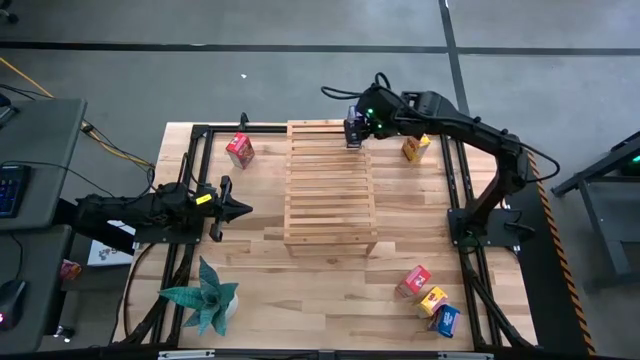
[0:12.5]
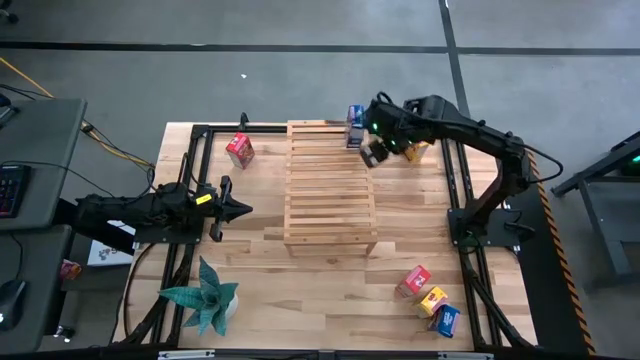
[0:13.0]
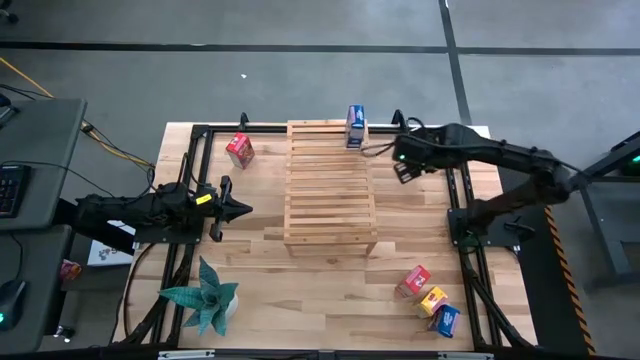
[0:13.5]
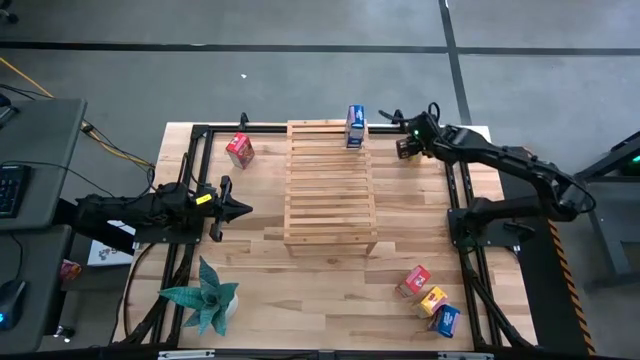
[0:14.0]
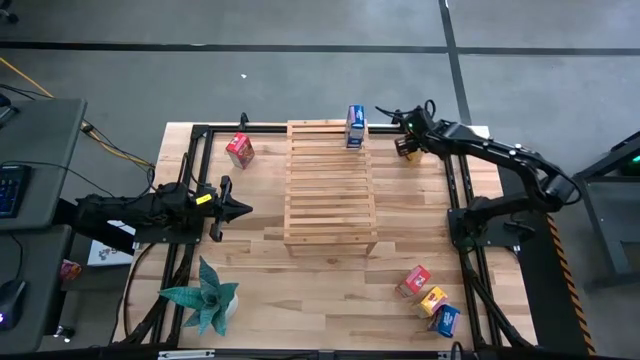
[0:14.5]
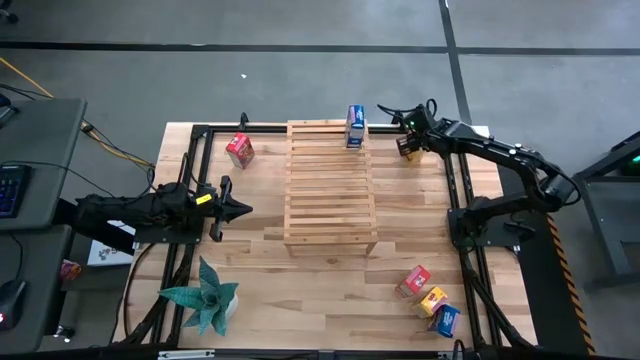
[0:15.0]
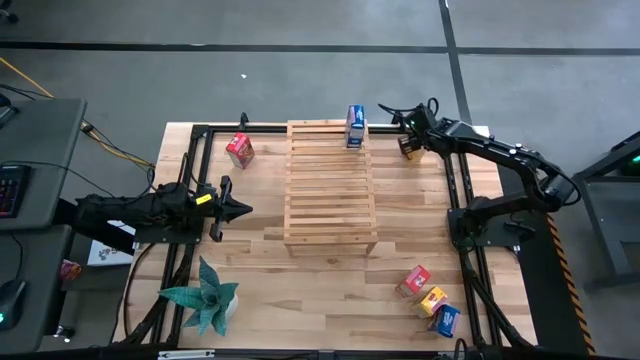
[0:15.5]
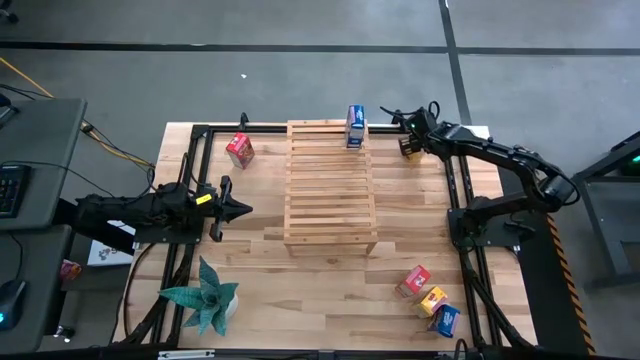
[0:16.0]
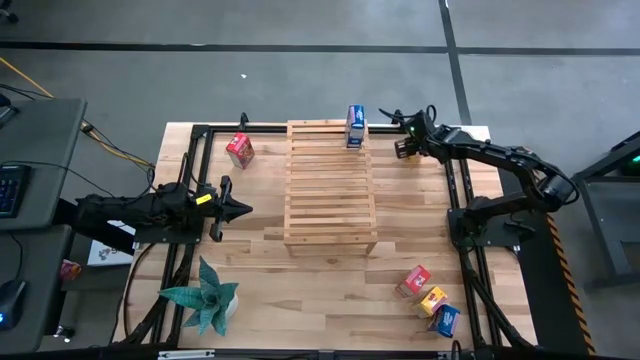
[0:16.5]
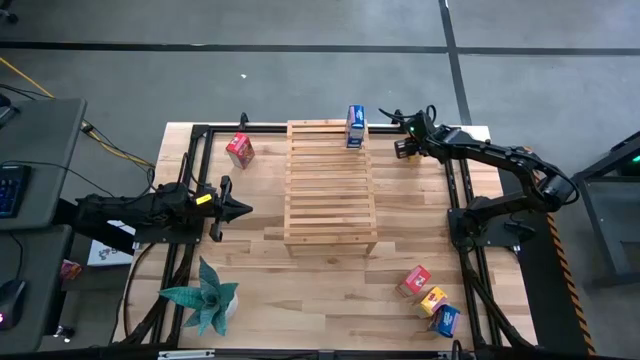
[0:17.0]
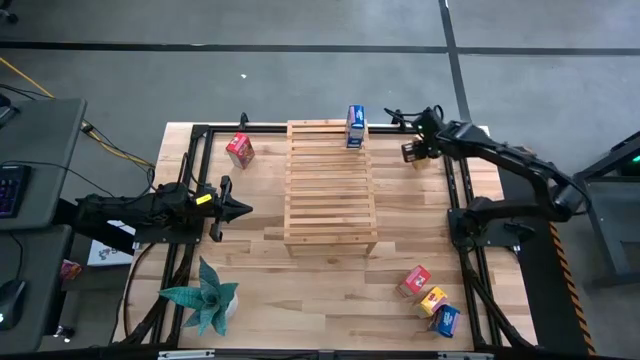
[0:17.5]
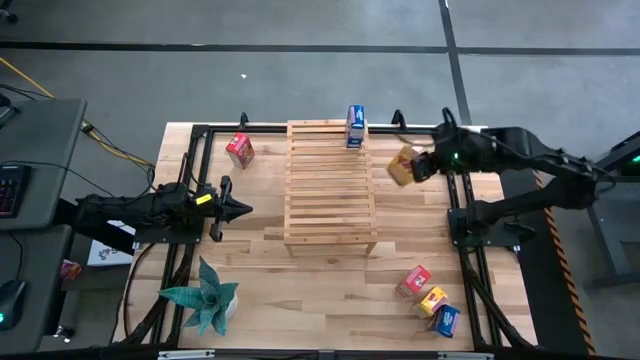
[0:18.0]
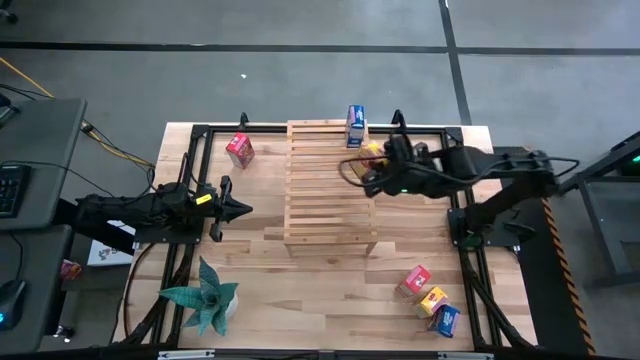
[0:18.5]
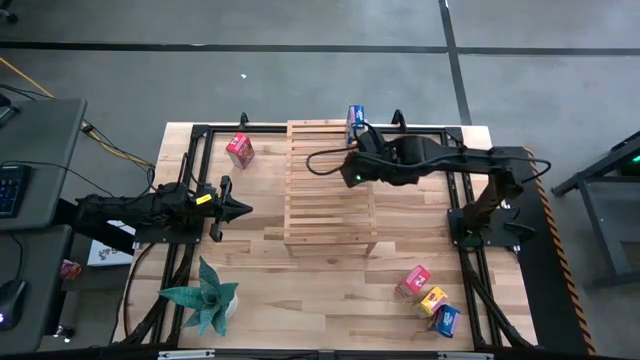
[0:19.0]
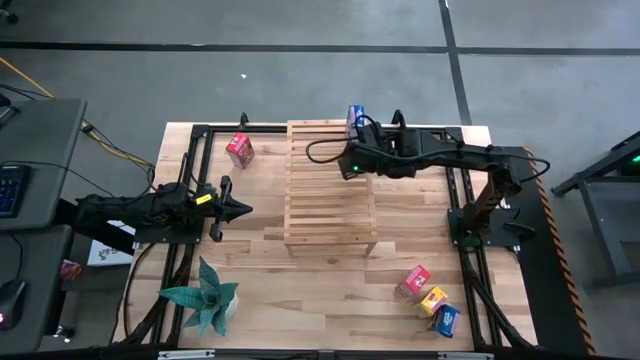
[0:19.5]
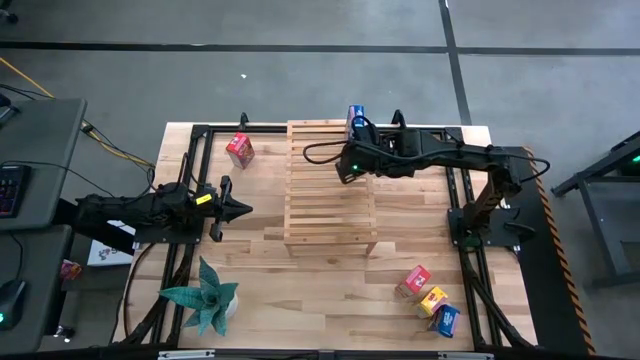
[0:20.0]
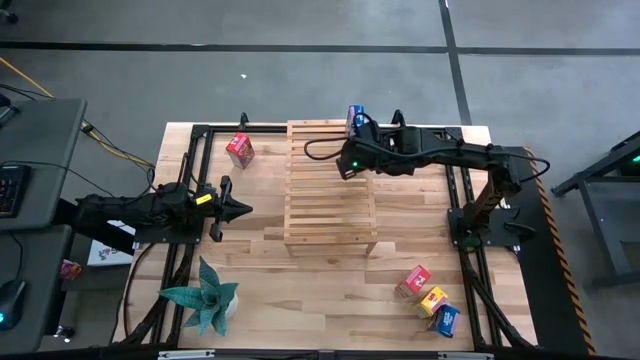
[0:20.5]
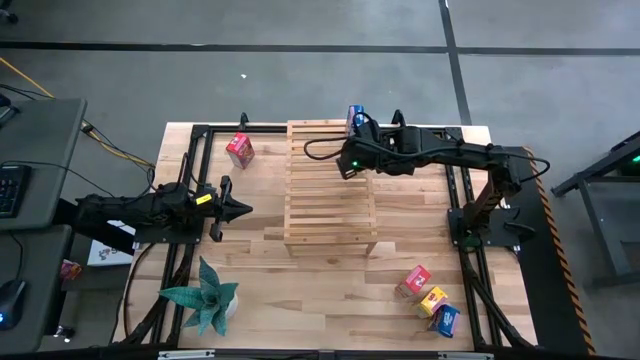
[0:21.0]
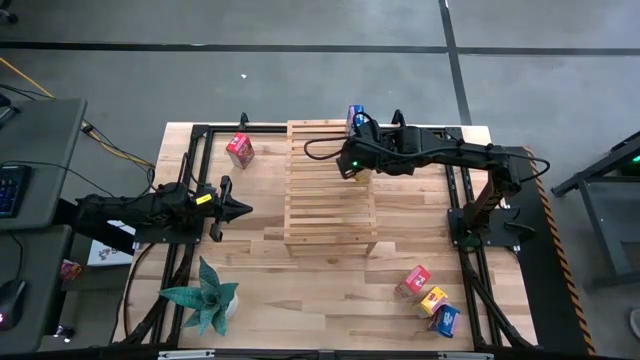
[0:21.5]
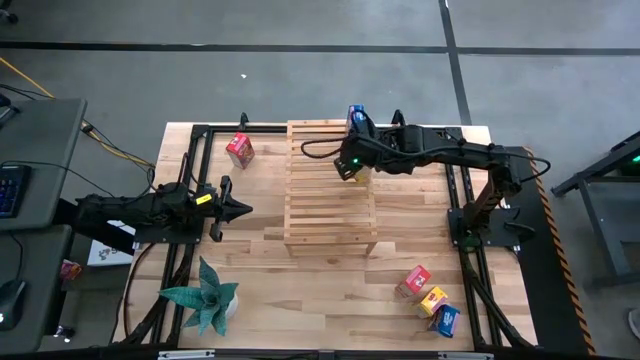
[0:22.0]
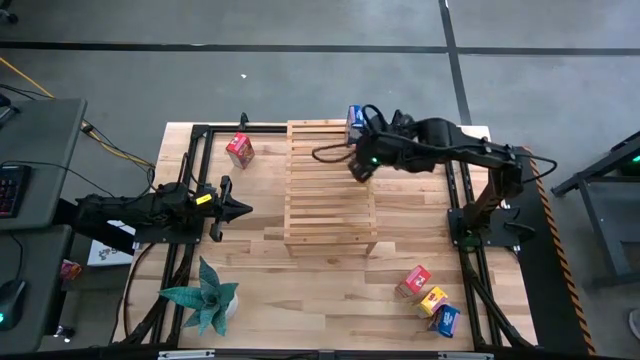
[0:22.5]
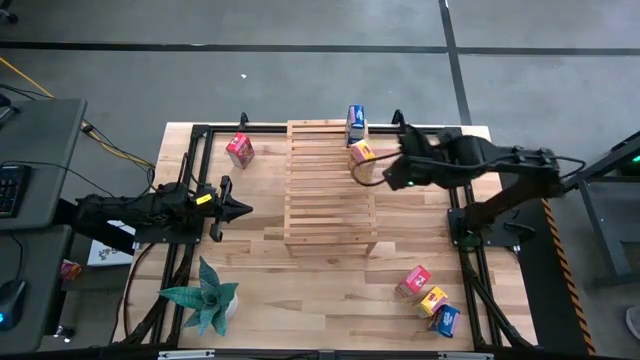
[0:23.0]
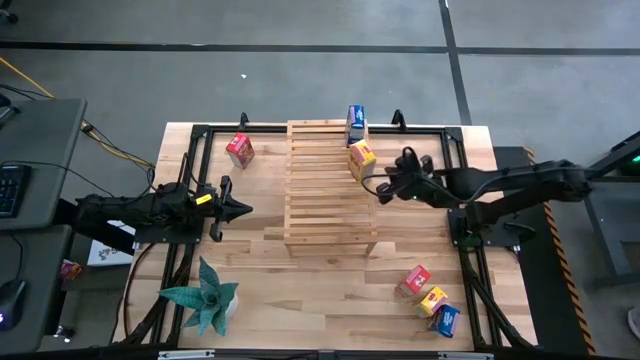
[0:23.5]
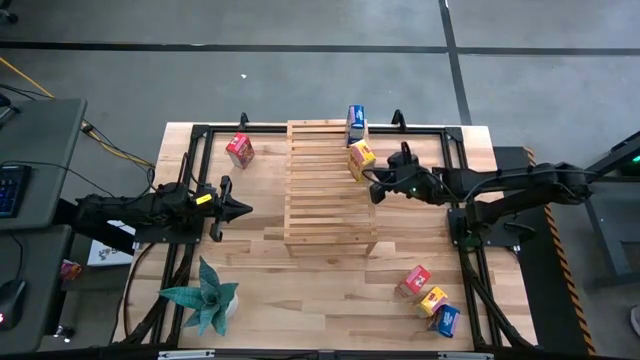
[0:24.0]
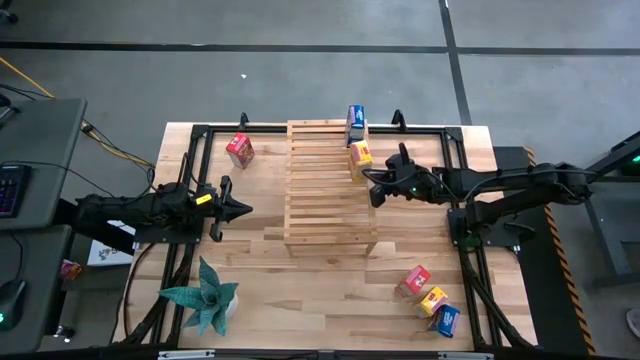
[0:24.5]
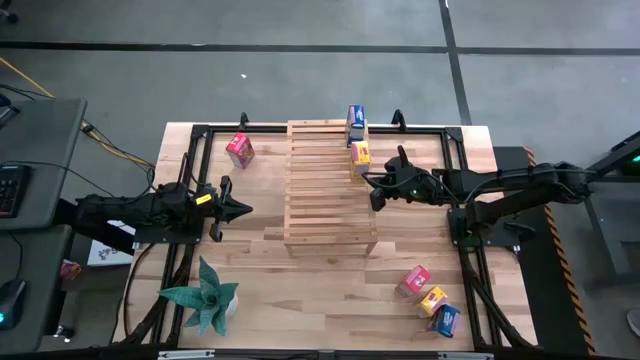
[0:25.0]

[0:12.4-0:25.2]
Task: Stack cereal on shelf
Put the top yellow cereal box on the shelf

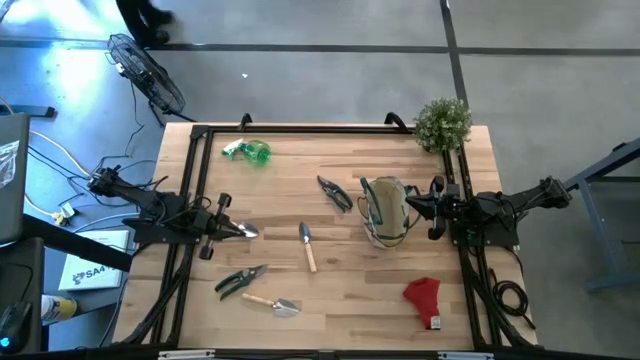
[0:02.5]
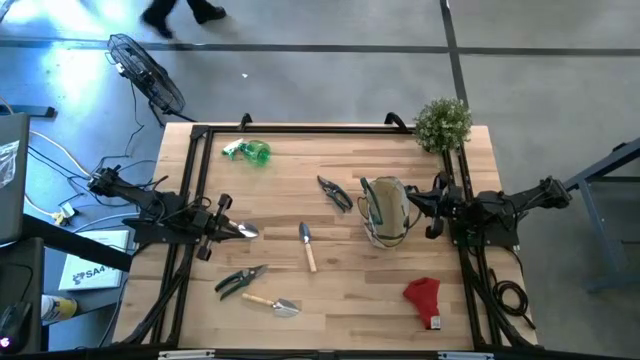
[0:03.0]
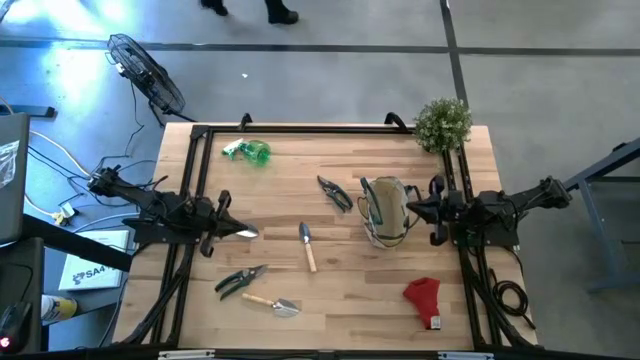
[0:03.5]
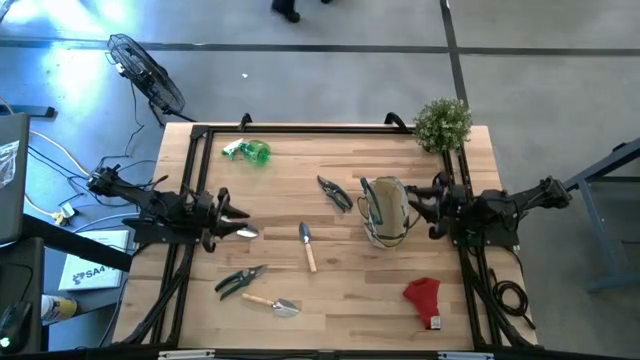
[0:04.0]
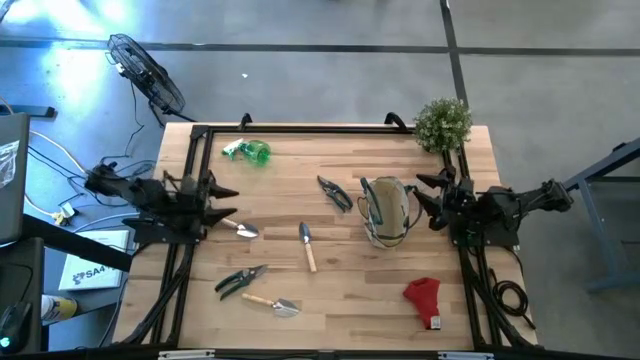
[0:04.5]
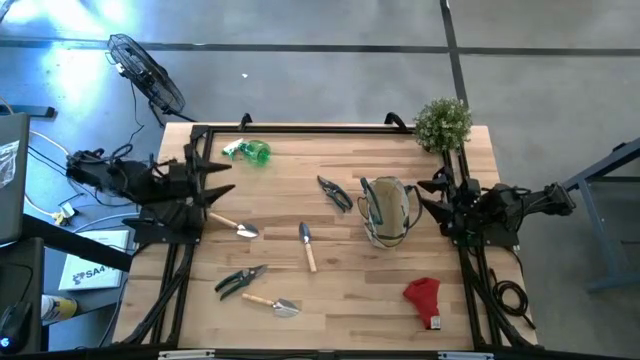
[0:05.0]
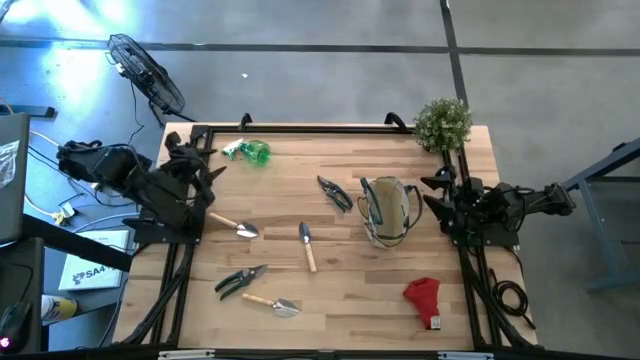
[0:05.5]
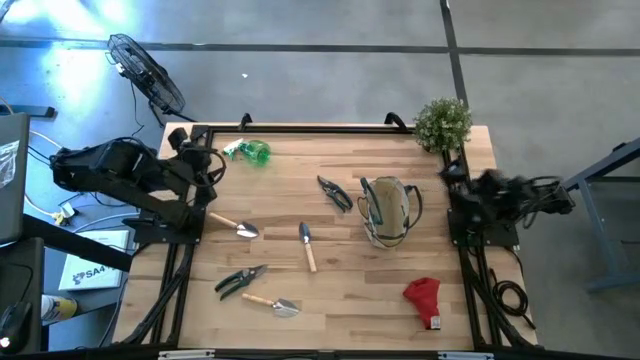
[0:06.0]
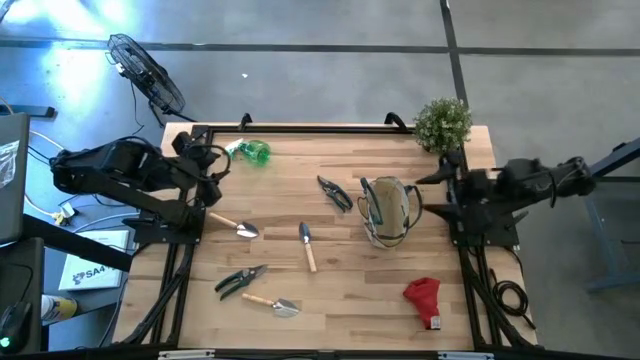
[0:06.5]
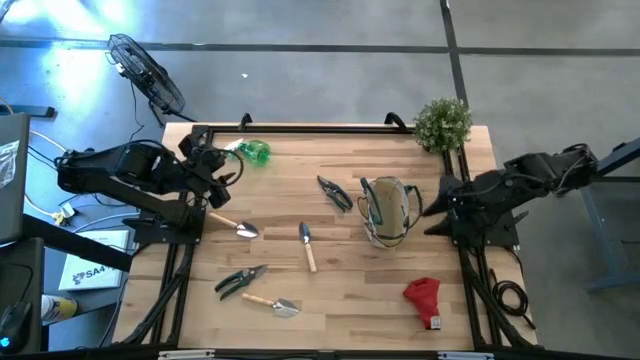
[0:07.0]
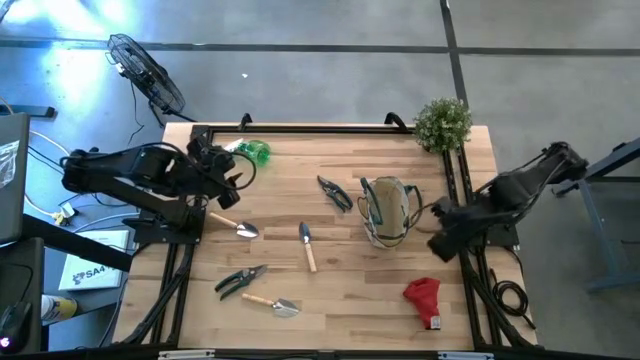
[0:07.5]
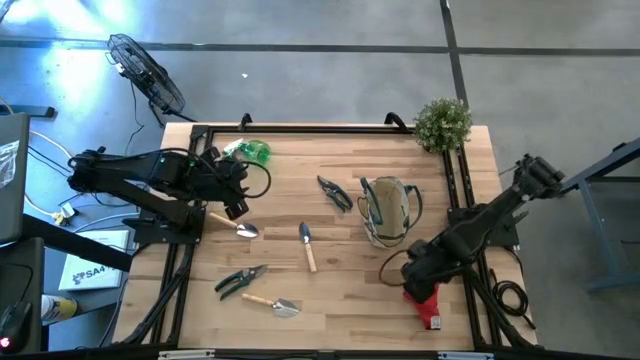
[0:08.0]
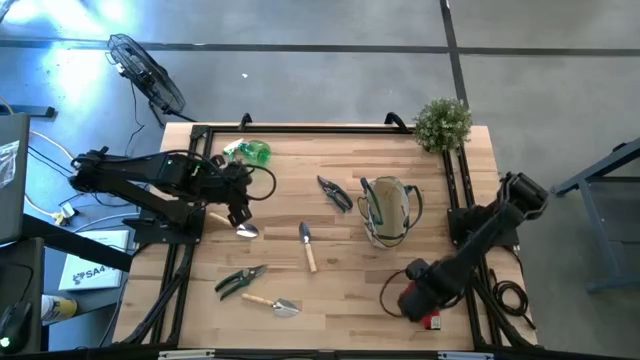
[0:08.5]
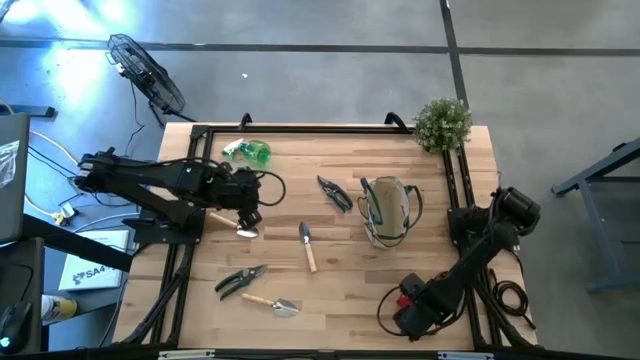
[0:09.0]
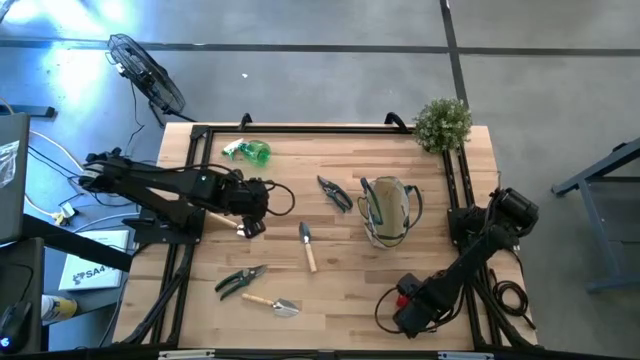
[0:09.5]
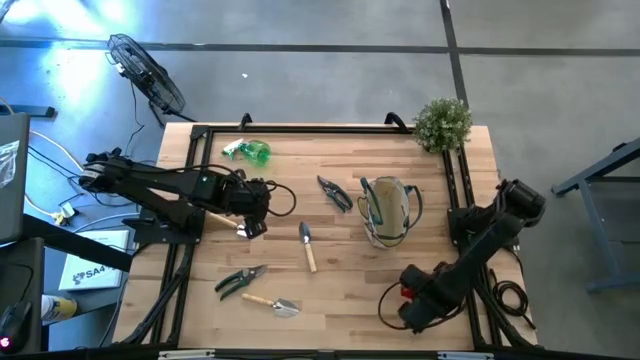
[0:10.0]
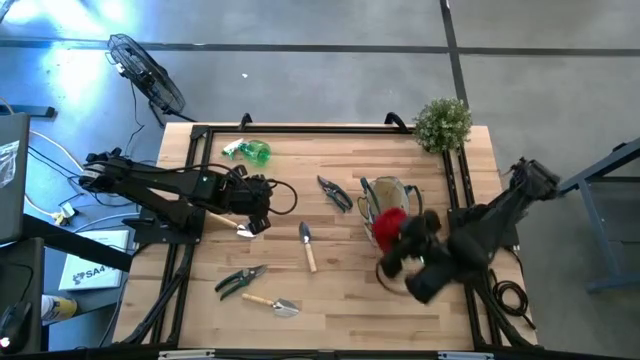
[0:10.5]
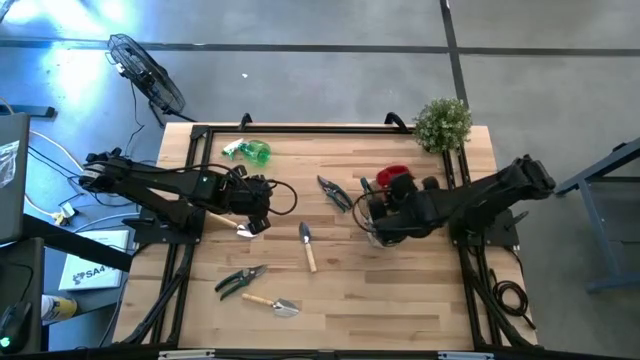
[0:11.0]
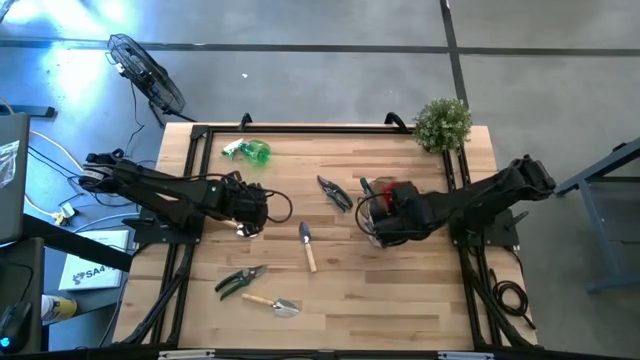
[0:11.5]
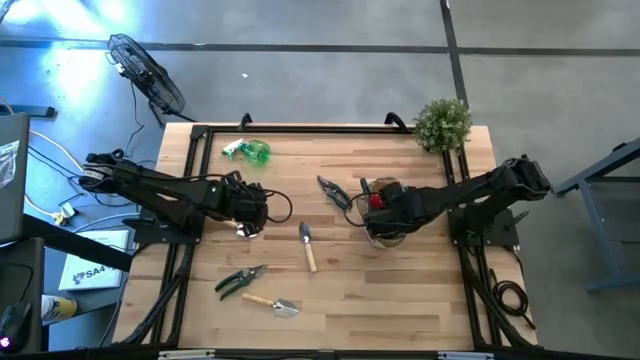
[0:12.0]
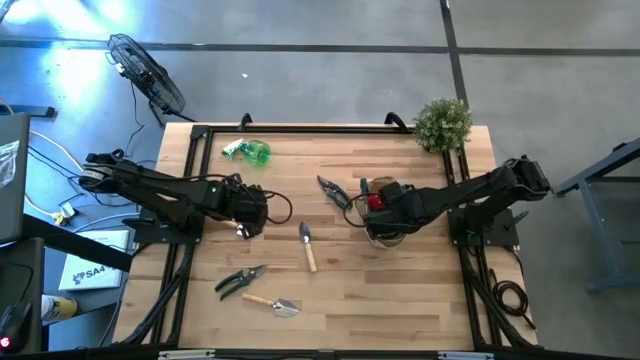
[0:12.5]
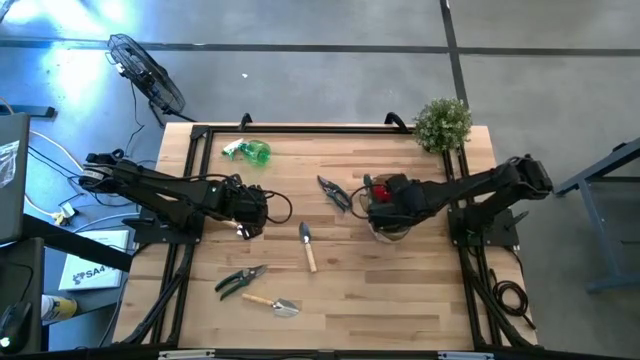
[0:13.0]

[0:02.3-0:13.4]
Task: Pick & Place Garden tools in Gardening bag
Put the red gloves into the gardening bag
